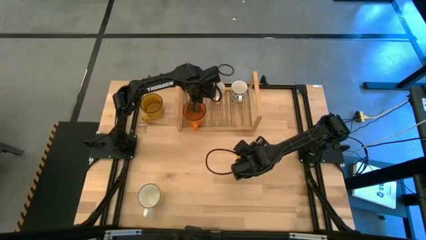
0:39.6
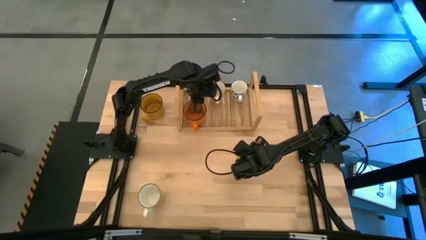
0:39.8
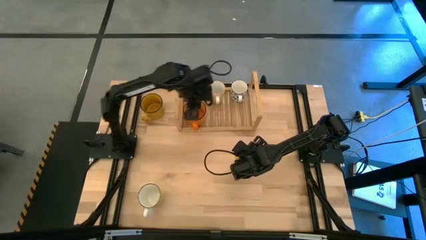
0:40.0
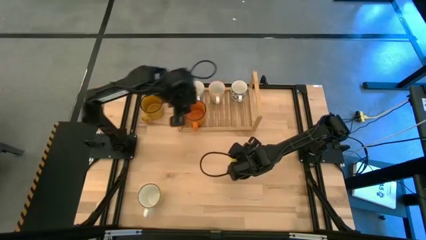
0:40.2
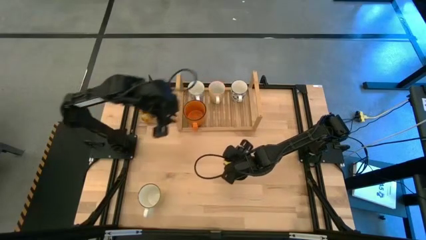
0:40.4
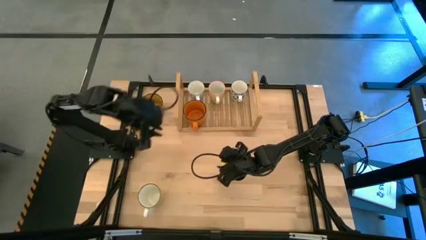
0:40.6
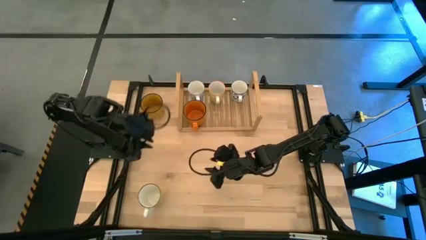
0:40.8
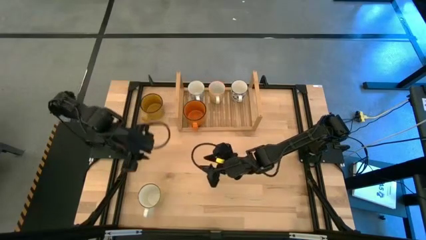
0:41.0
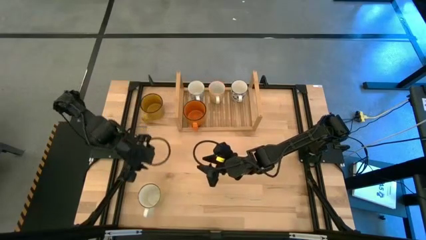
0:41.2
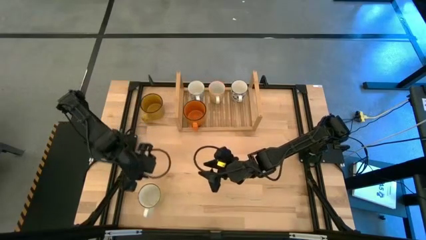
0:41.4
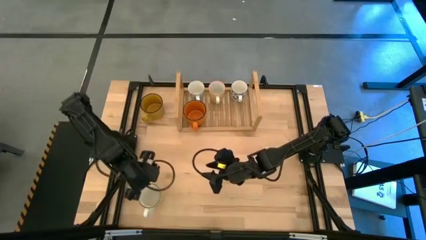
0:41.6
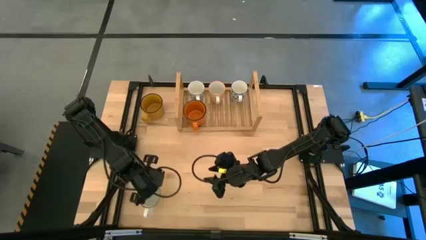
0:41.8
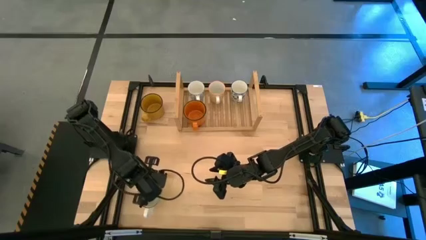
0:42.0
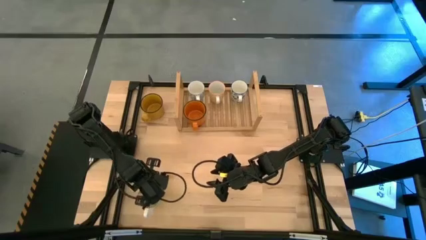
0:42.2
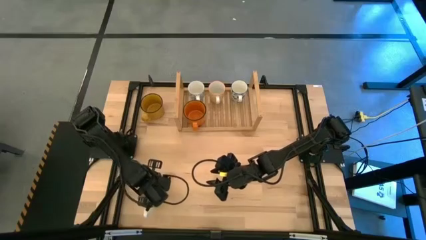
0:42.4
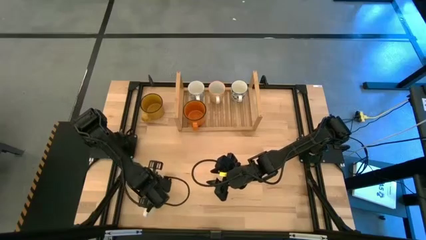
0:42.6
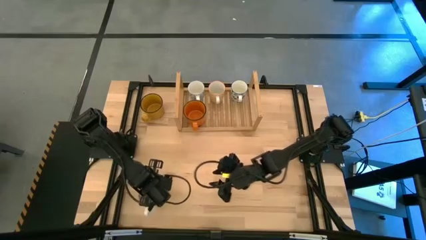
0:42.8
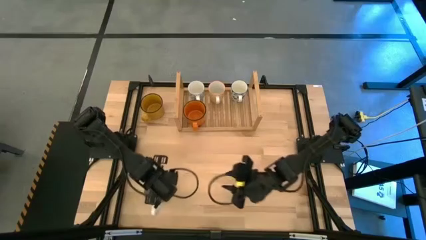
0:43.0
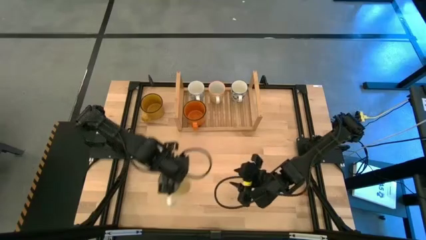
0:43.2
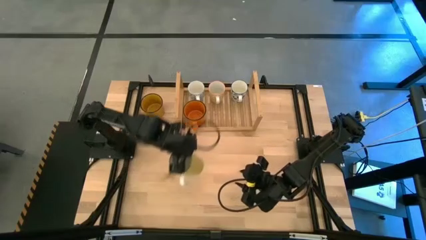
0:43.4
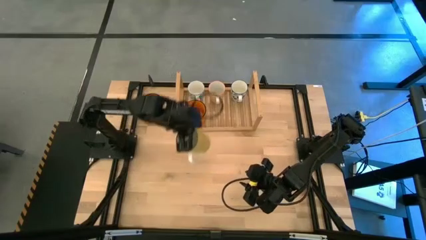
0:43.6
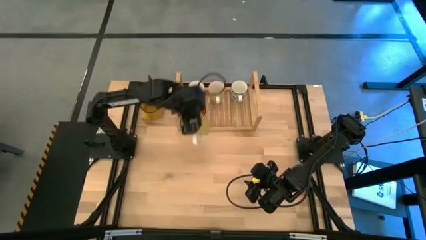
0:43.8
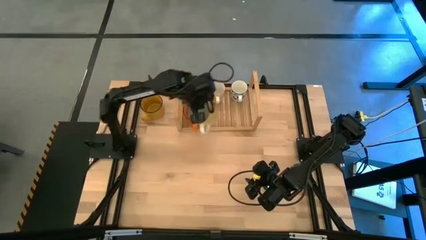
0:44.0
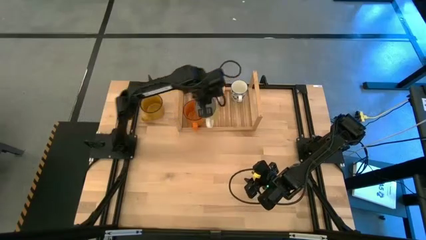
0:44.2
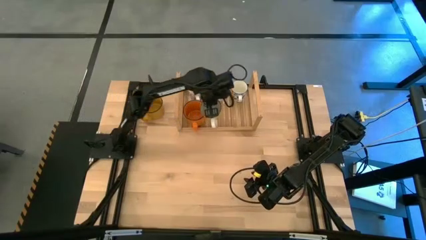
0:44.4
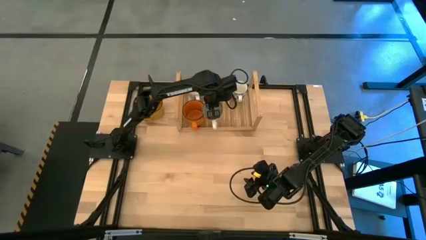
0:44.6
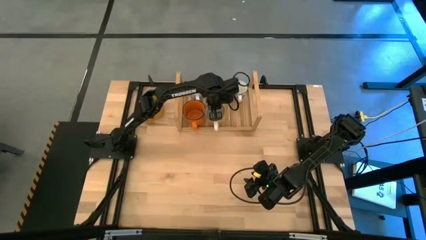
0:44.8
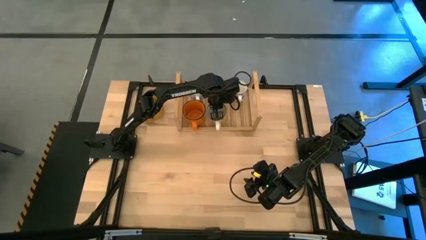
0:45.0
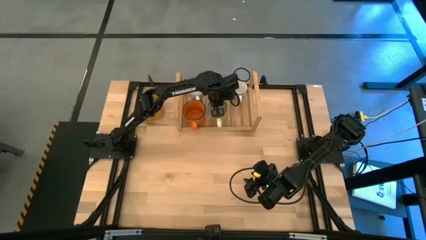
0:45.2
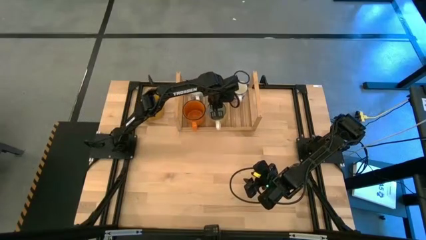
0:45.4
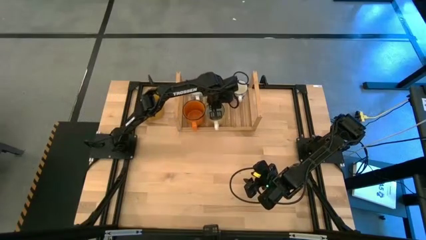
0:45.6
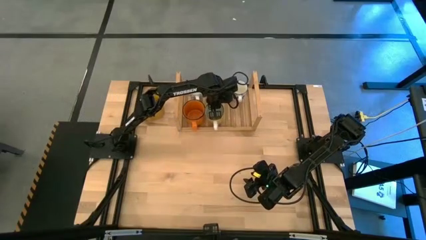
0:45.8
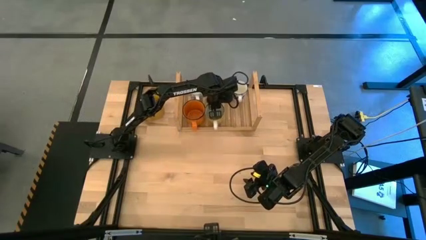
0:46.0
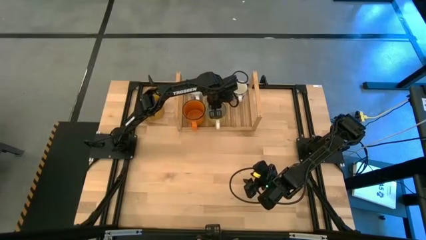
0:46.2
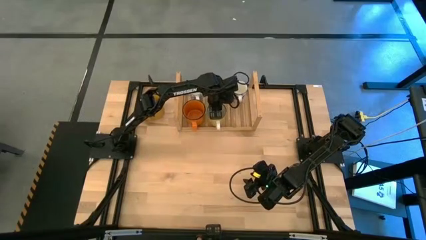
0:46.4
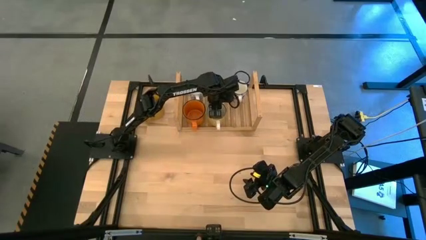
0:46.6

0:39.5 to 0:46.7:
Task: Place coffee mugs
Put the light yellow mug on the shelf

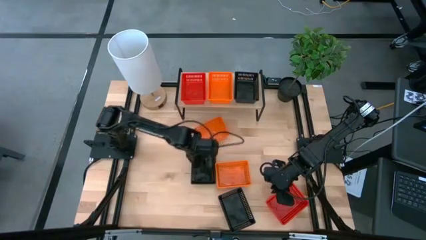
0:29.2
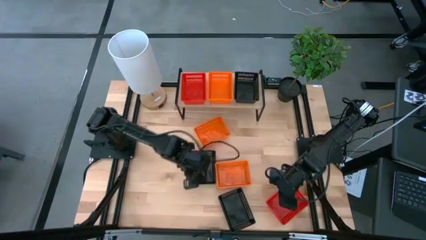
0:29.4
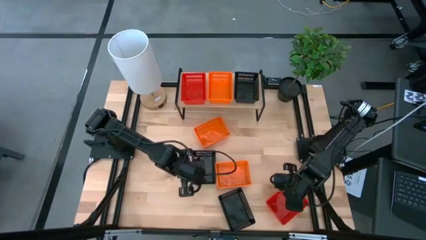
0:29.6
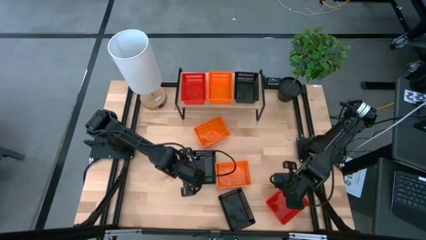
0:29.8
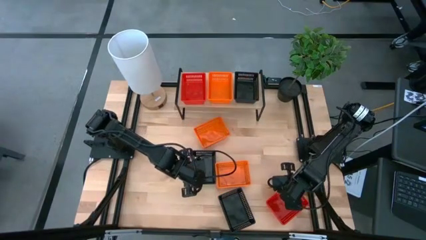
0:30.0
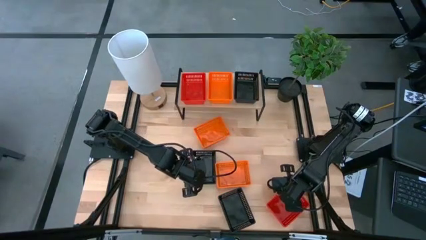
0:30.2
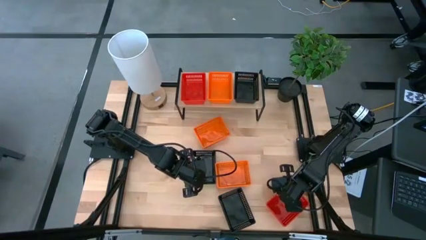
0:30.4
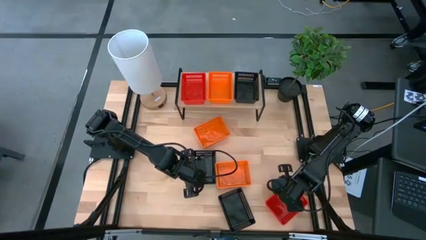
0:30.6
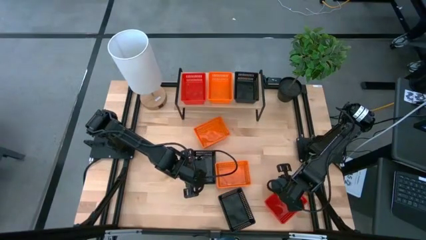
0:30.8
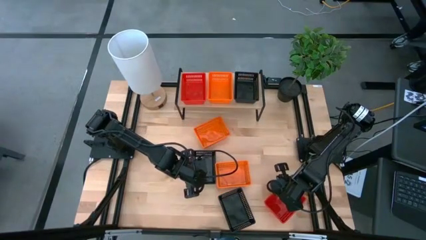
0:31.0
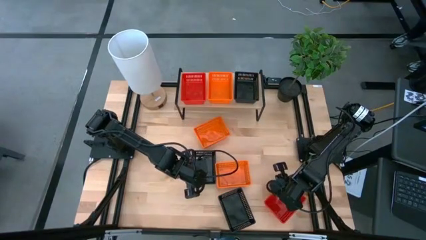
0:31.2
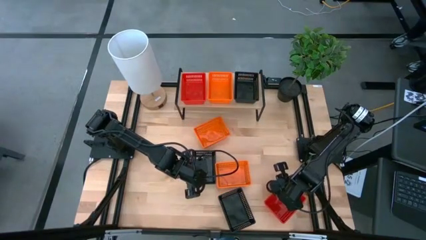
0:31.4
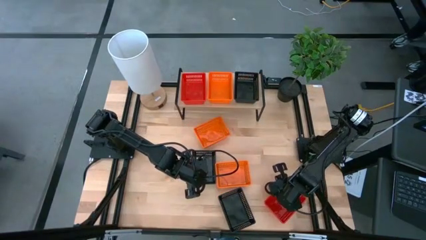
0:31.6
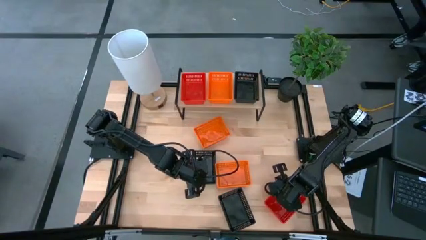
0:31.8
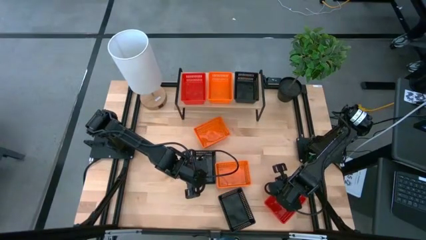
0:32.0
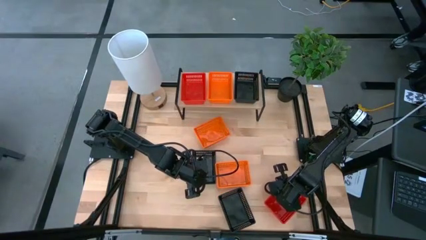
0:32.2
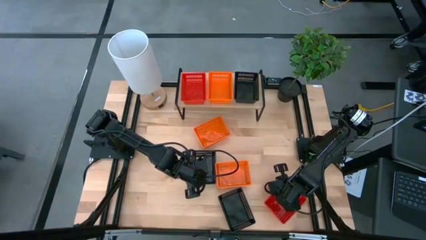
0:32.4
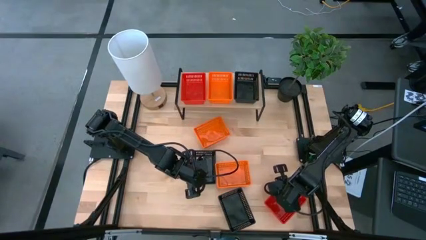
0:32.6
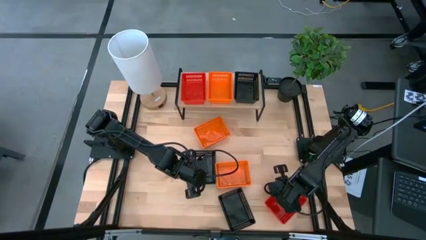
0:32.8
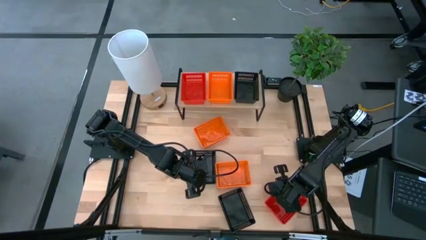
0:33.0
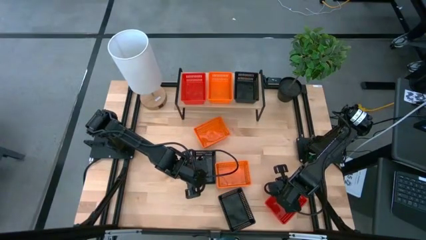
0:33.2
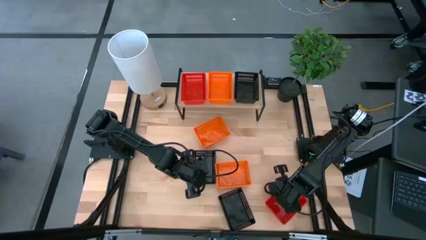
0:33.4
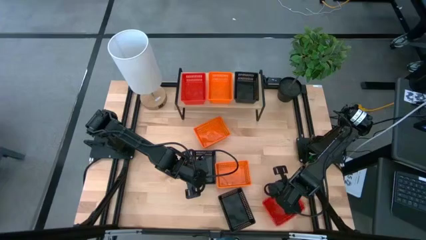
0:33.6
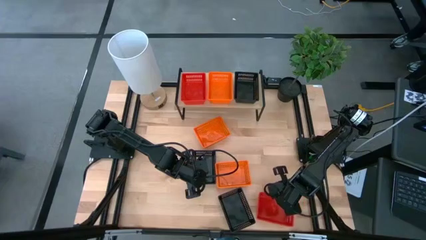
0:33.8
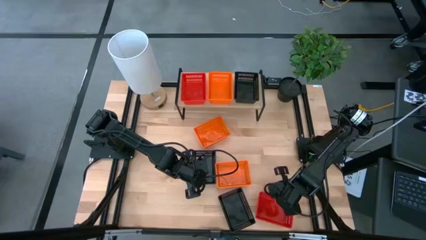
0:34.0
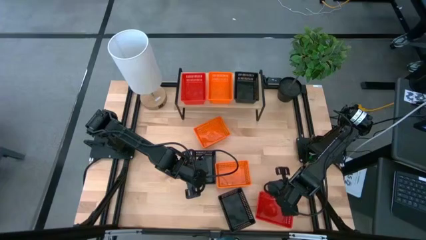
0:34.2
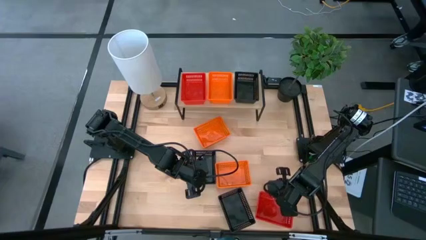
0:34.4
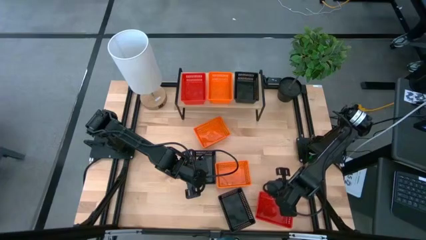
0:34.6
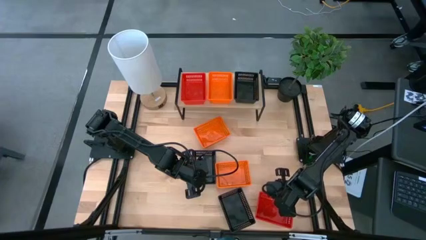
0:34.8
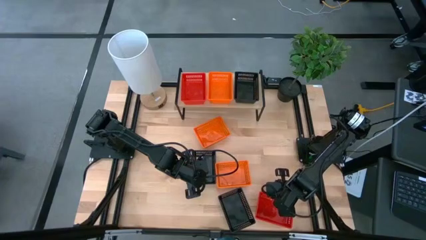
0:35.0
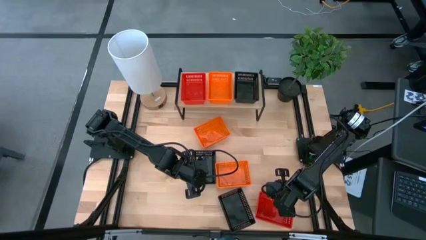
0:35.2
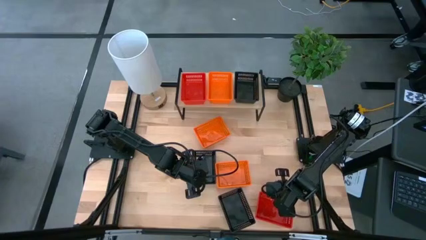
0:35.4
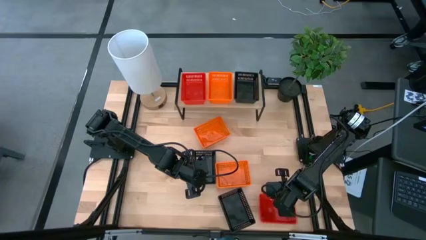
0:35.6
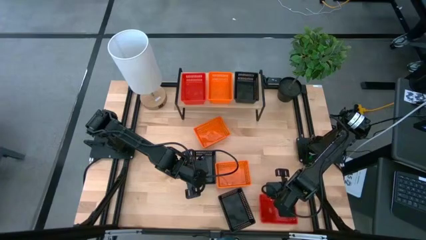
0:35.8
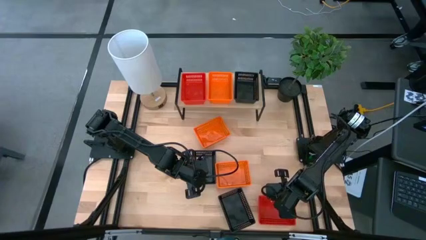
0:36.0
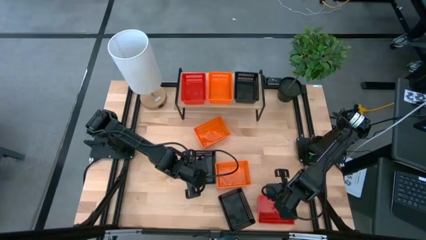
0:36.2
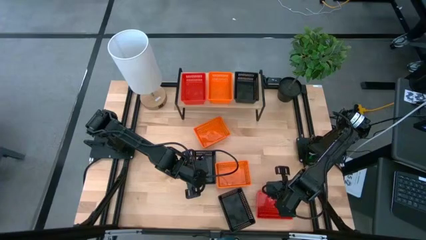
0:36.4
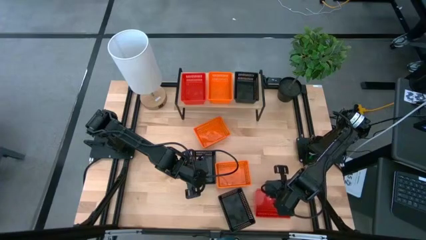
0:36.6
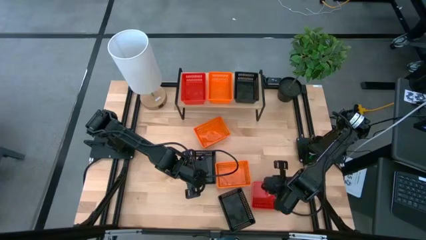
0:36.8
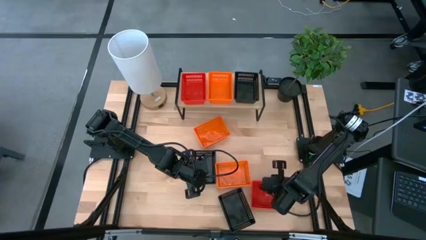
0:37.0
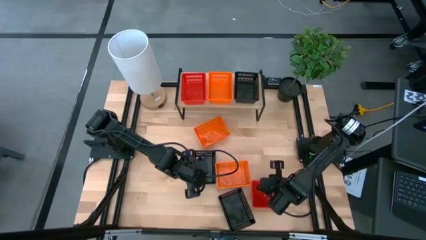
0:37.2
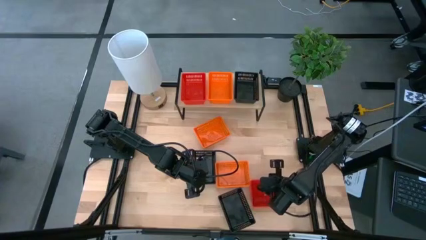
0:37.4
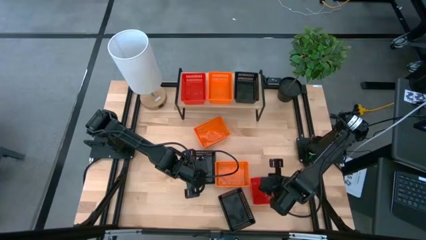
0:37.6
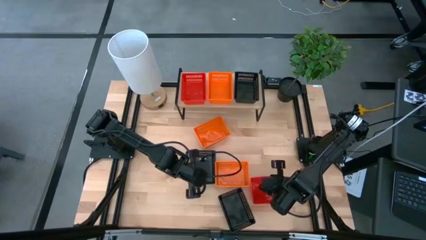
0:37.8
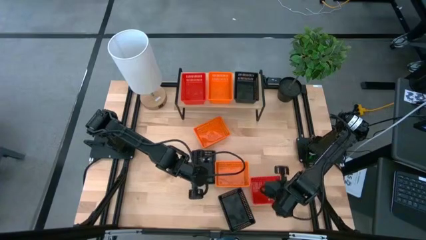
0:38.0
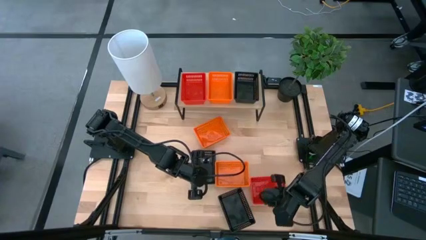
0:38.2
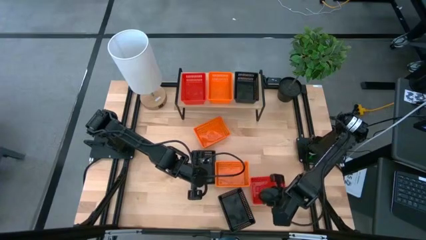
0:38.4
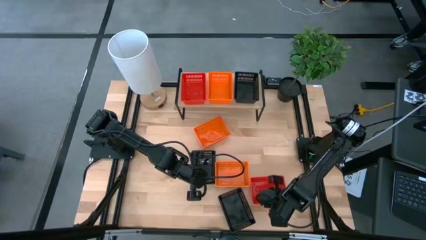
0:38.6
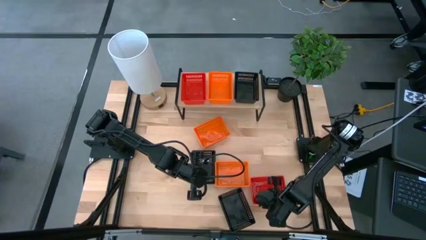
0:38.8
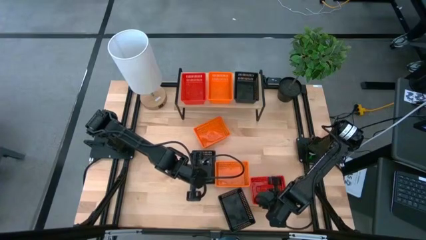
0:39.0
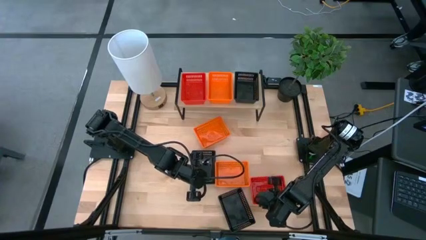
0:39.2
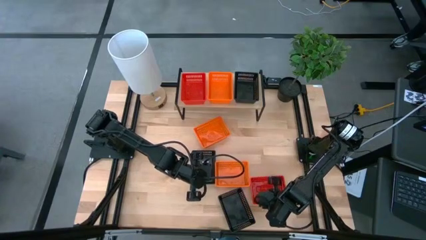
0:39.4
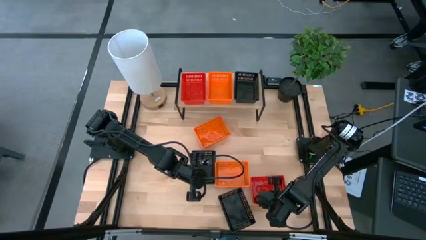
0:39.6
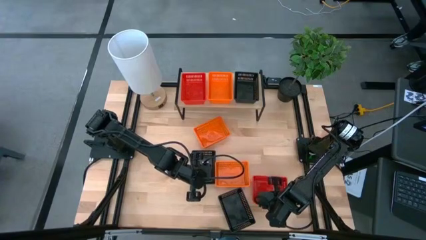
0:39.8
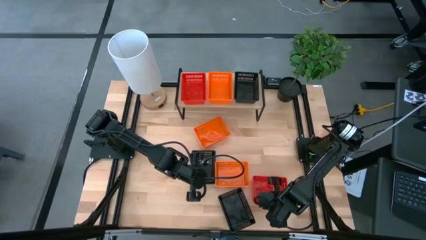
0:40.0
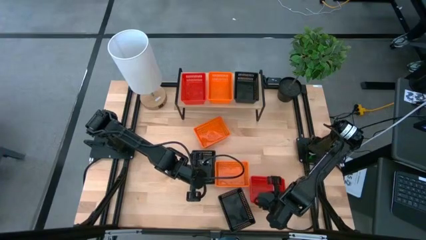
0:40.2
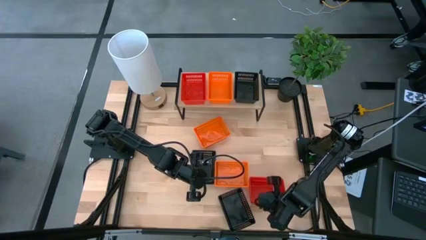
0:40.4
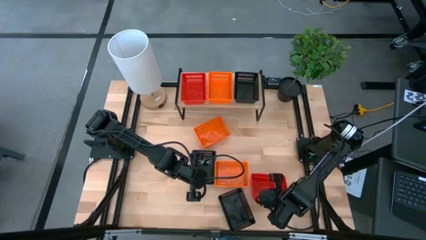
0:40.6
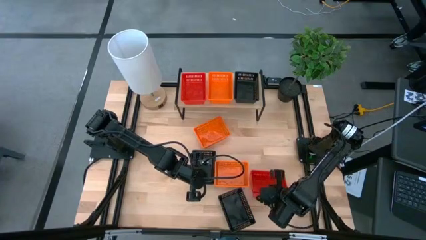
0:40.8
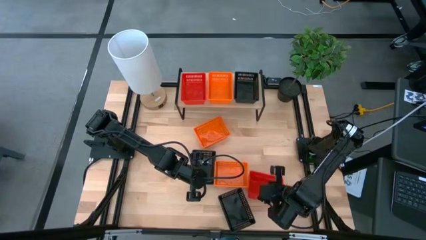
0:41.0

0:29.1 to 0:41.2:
Task: Stack baskets on shelf by color
Remove the top red basket from the red basket
